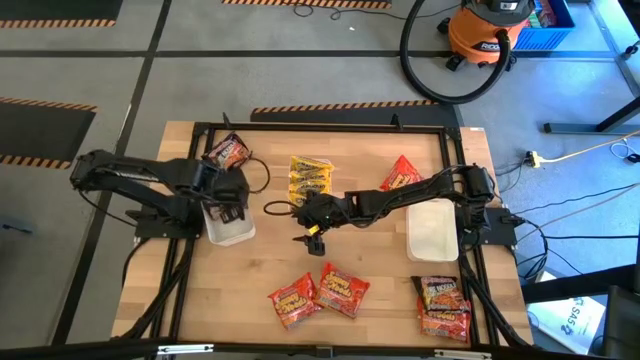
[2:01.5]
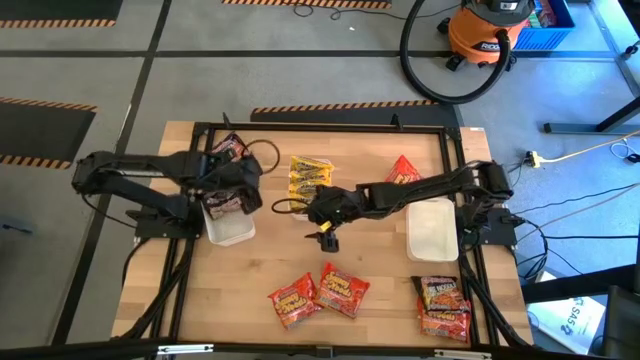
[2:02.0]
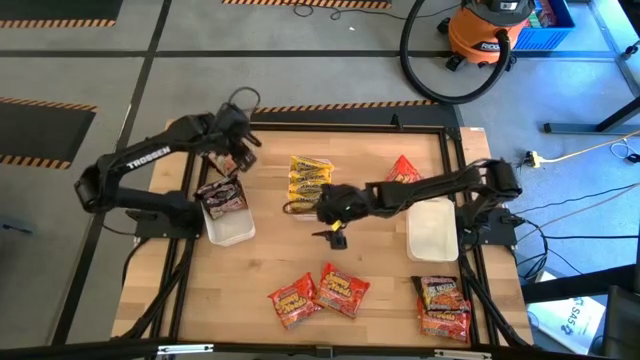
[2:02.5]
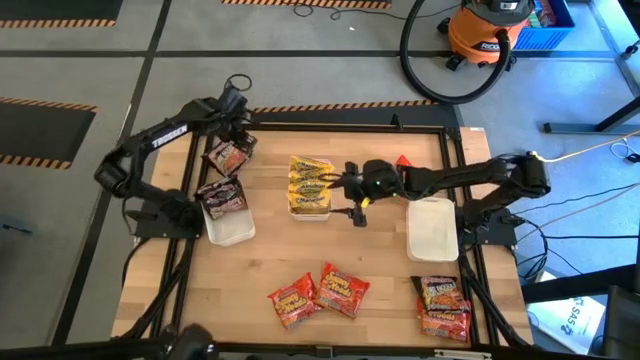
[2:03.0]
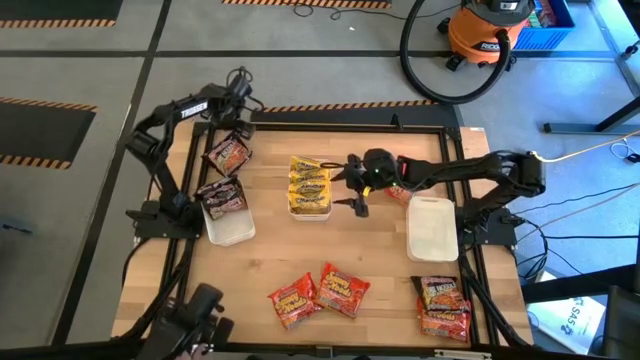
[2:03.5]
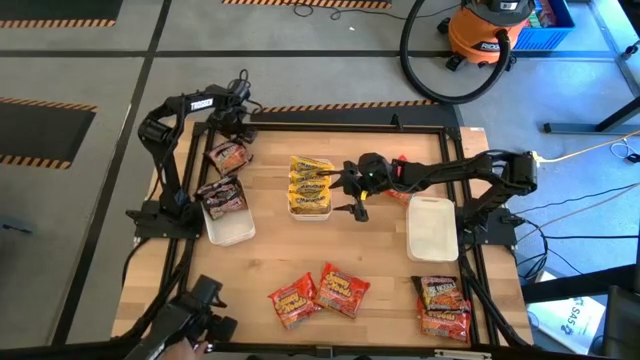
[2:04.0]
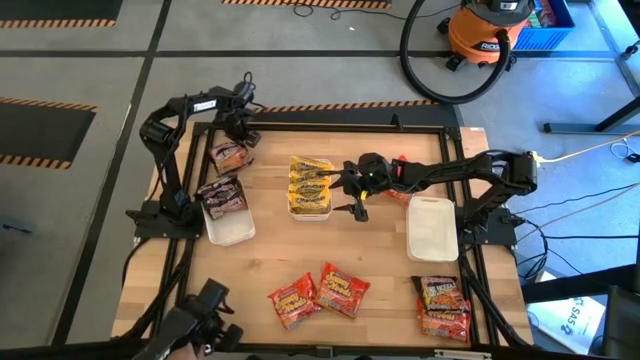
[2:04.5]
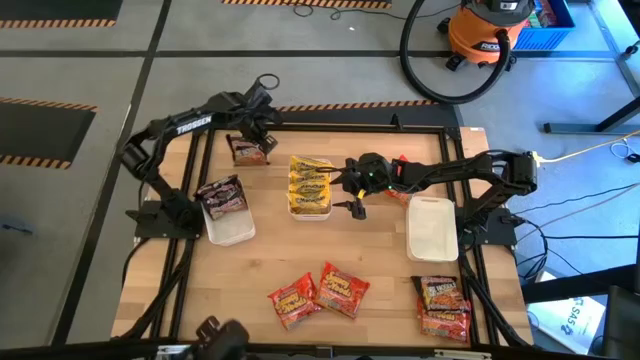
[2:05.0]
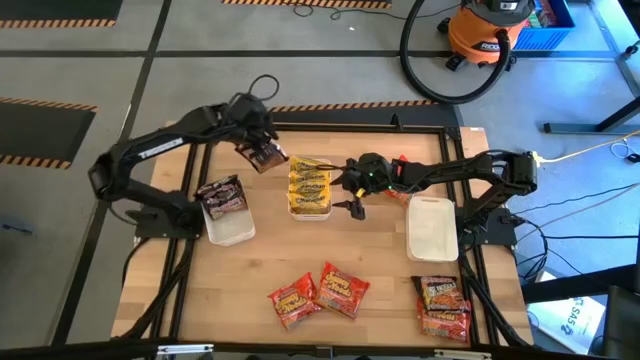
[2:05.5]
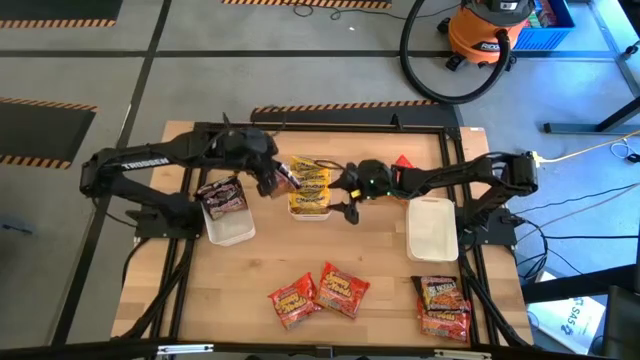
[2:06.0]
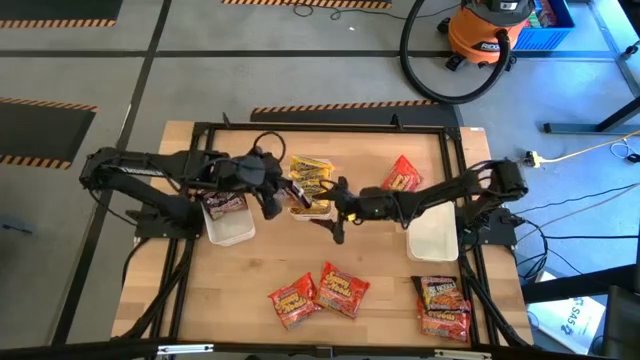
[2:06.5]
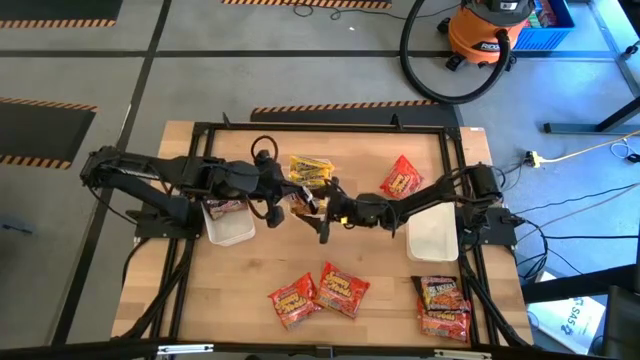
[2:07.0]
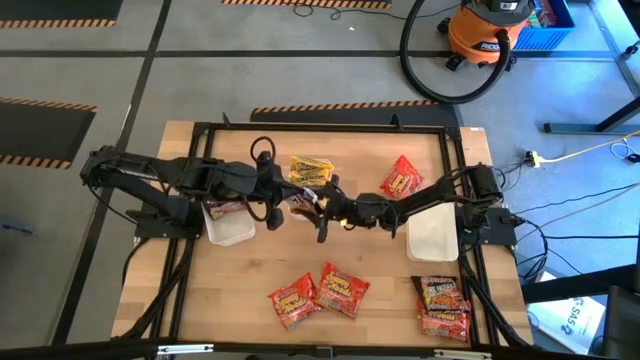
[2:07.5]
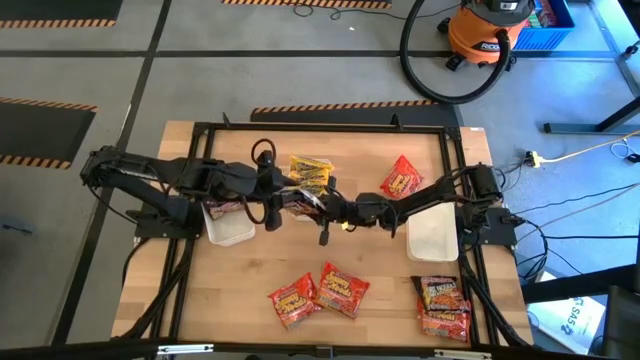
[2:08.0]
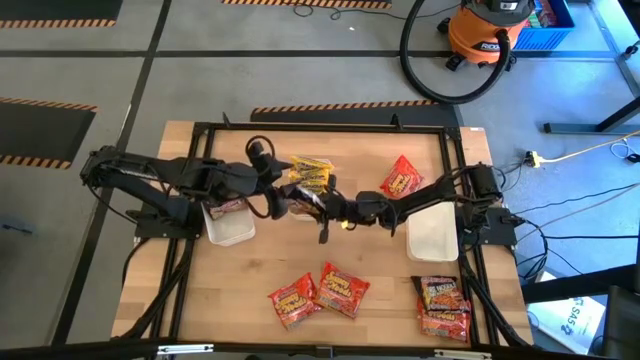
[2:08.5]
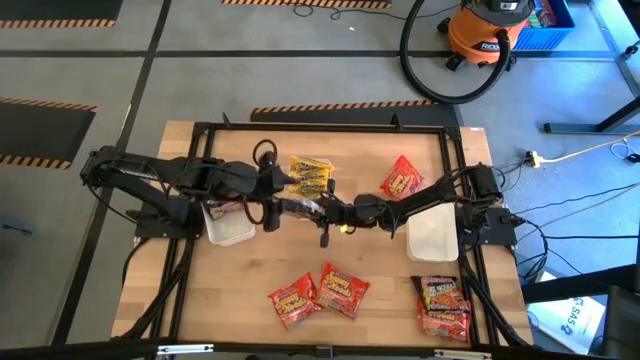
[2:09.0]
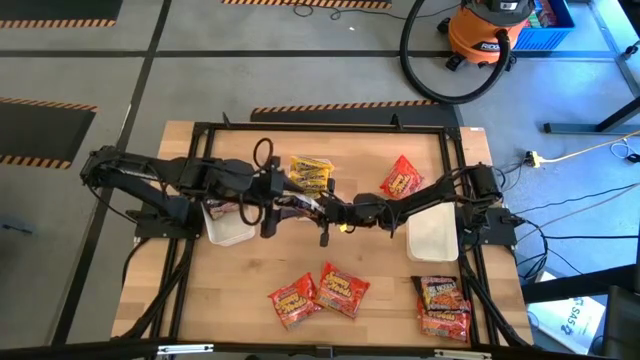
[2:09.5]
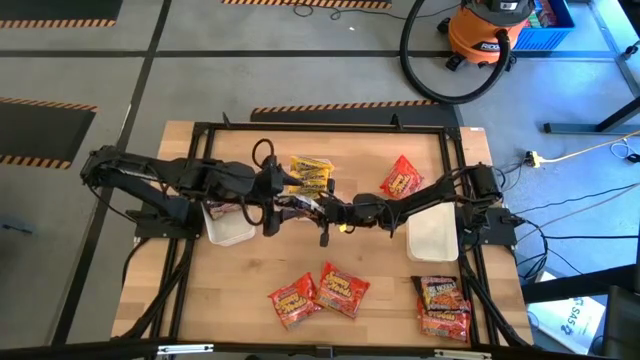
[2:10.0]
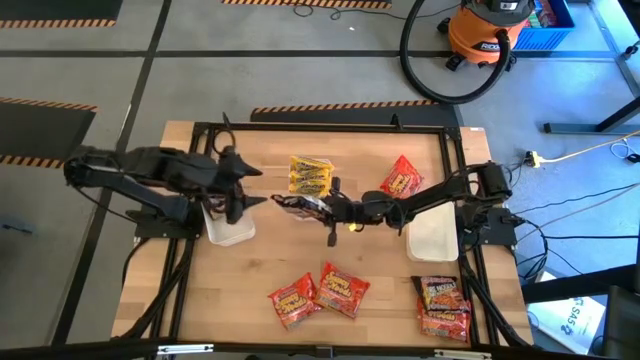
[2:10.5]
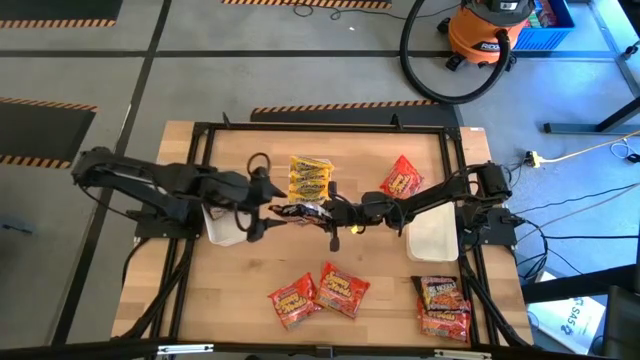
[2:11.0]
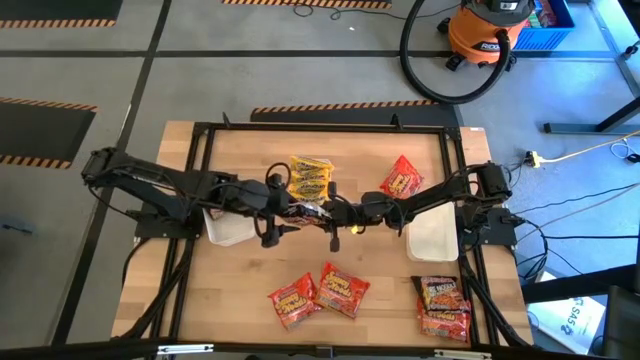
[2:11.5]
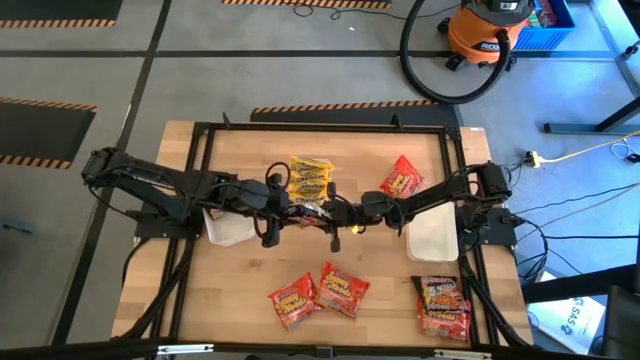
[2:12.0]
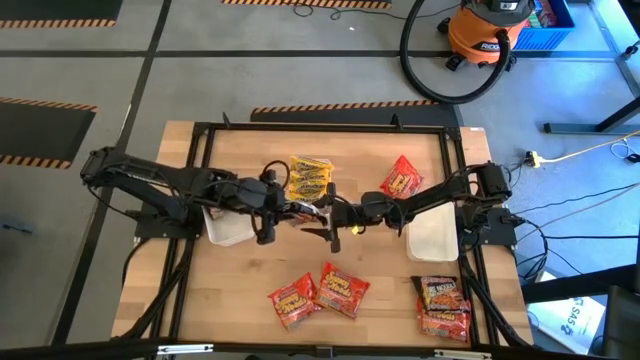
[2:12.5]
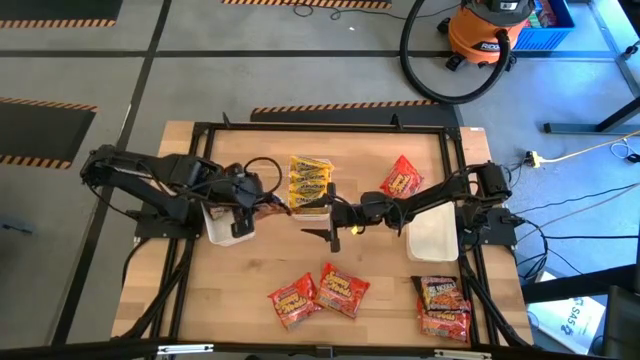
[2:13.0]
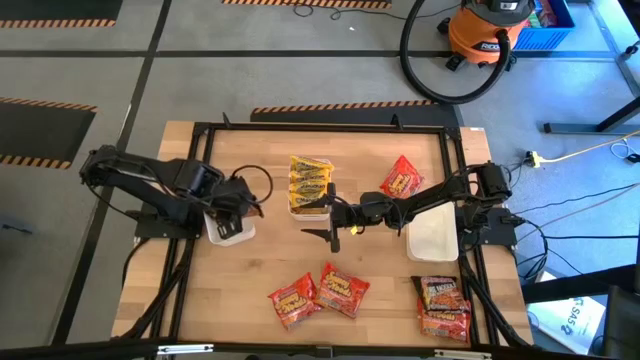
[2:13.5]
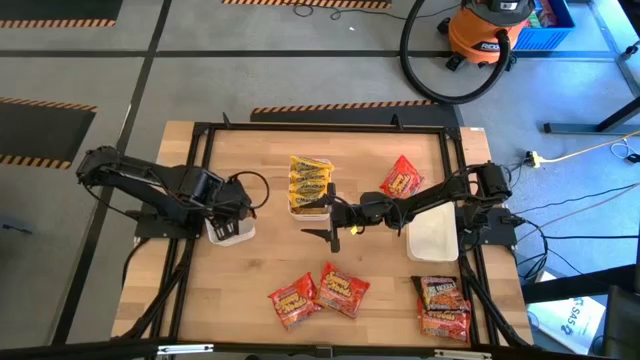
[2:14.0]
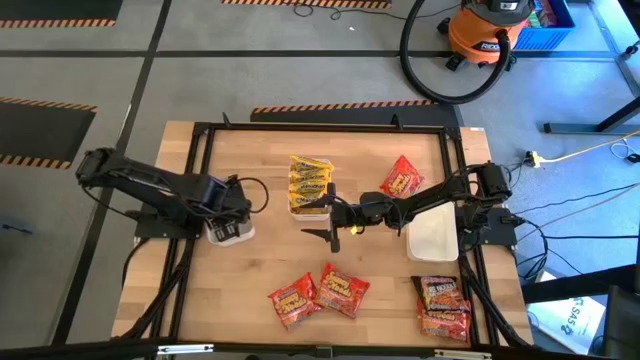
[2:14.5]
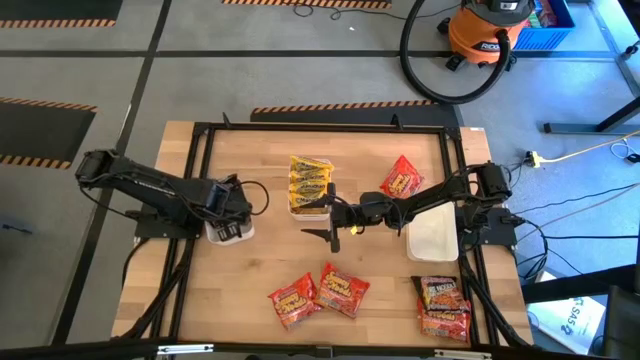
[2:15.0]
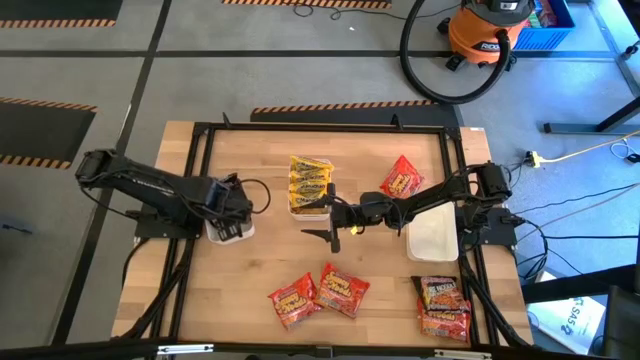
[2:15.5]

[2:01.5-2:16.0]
Task: Sort Maruchan noodles
Put the top black noodle pack into the left white bin

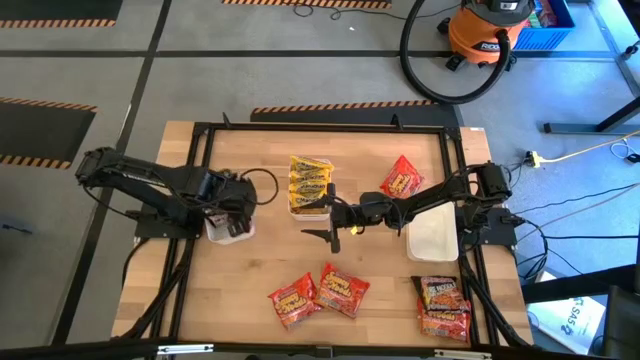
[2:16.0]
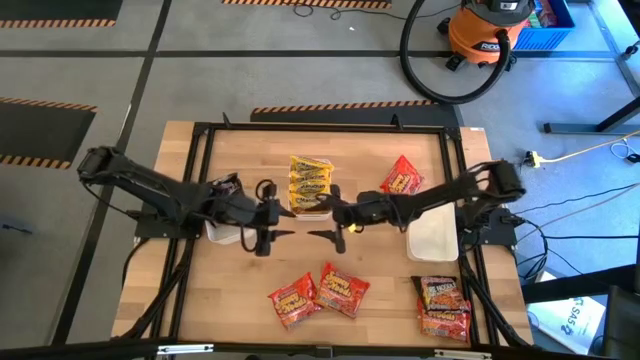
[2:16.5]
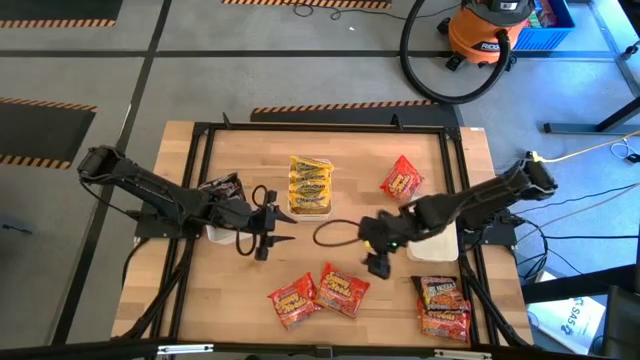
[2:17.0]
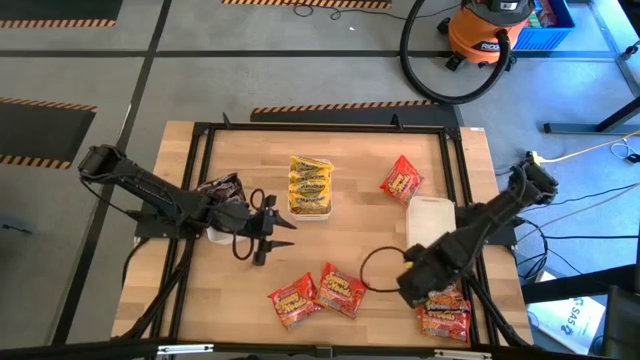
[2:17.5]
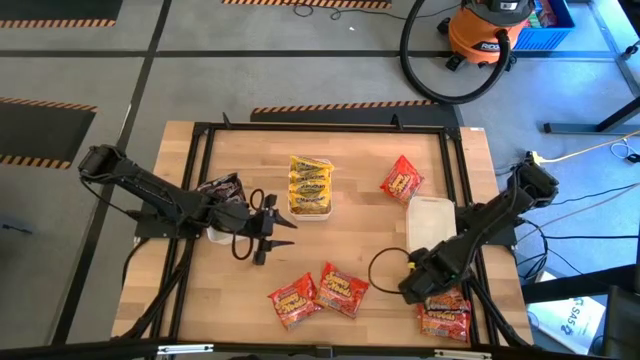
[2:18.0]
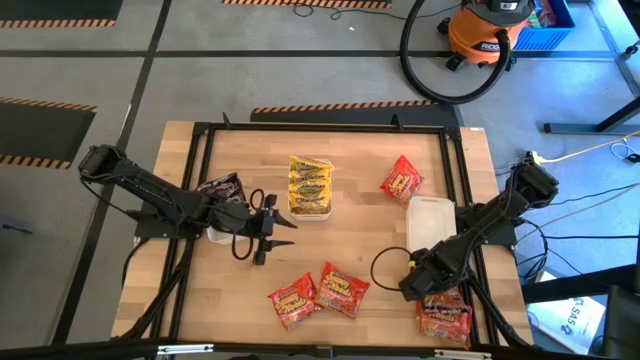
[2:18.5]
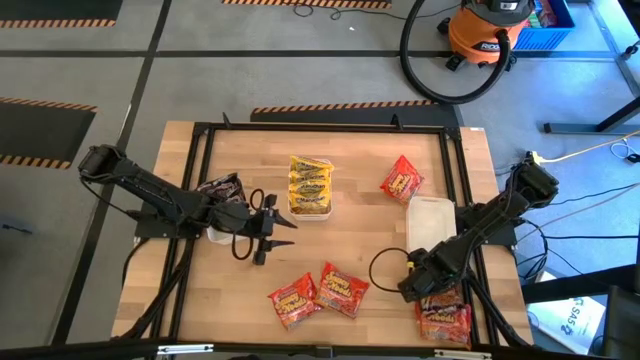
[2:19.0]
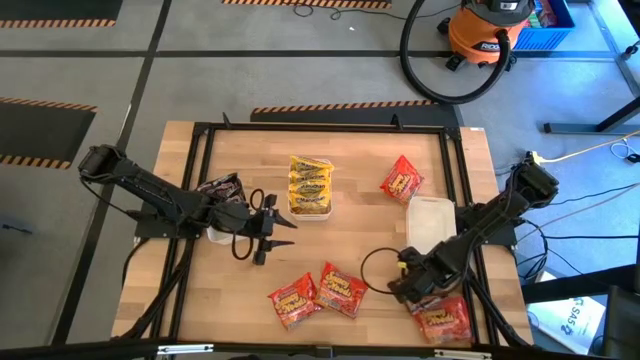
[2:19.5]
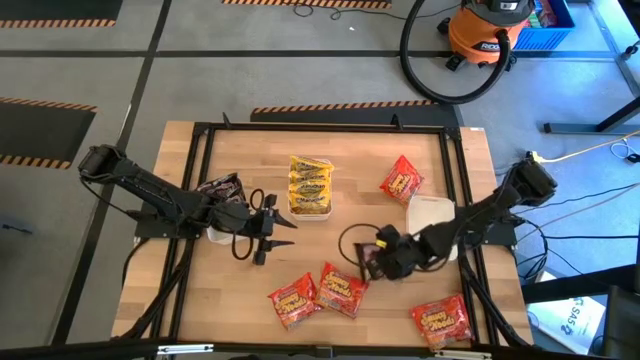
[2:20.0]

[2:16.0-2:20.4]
Put the black noodle pack into the left white bin

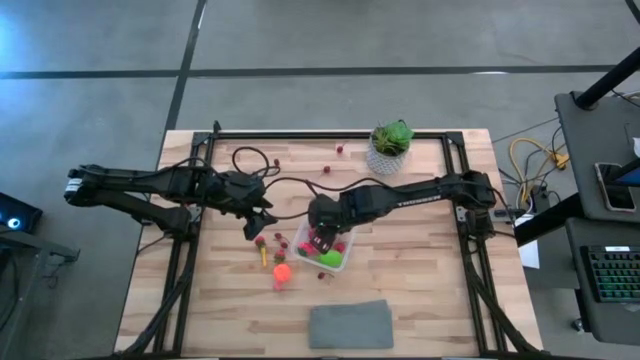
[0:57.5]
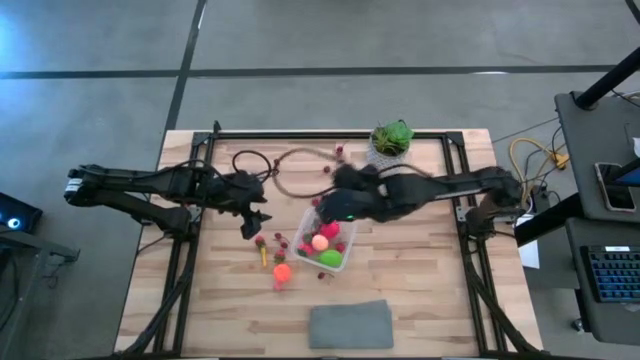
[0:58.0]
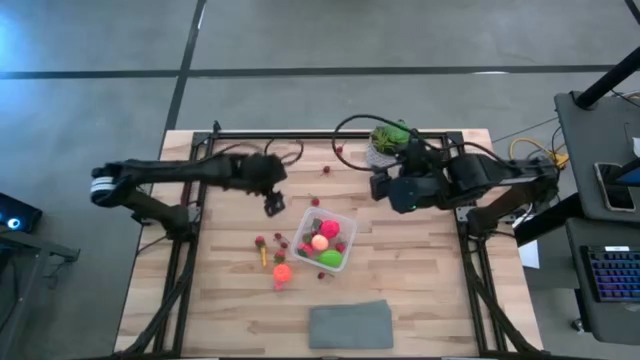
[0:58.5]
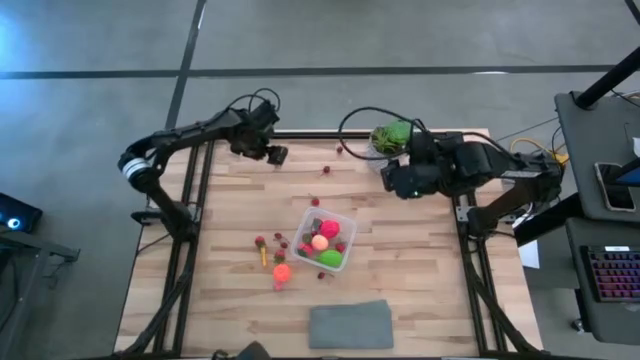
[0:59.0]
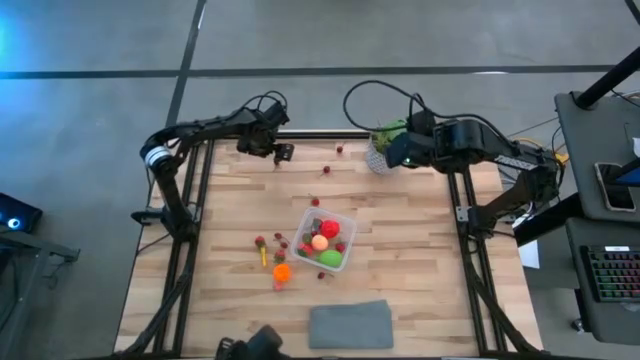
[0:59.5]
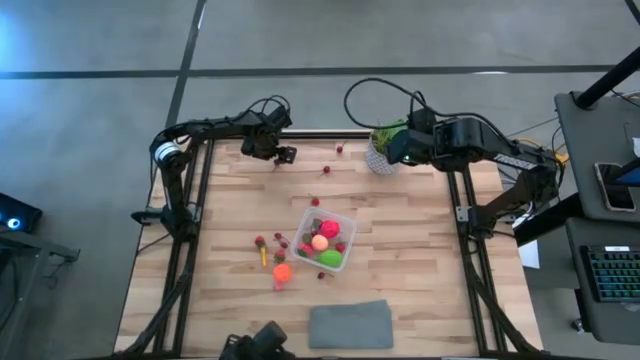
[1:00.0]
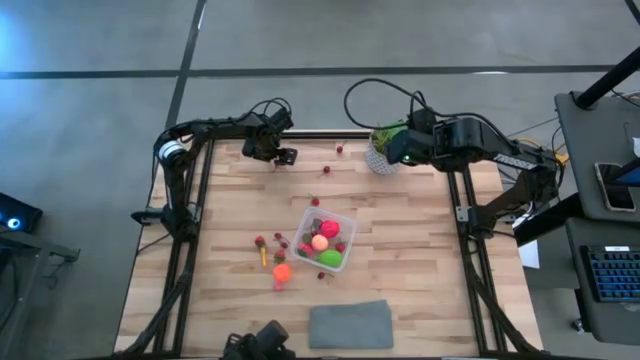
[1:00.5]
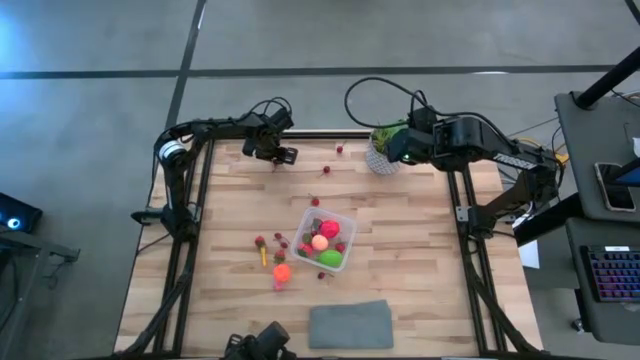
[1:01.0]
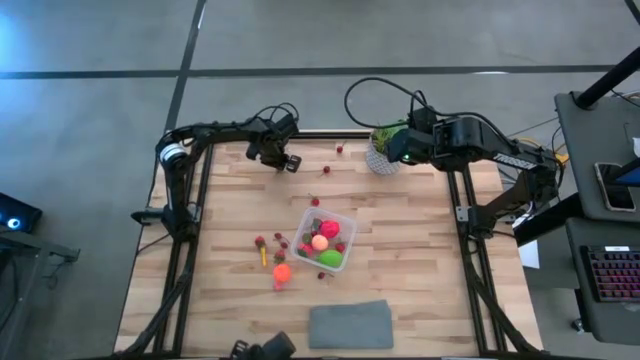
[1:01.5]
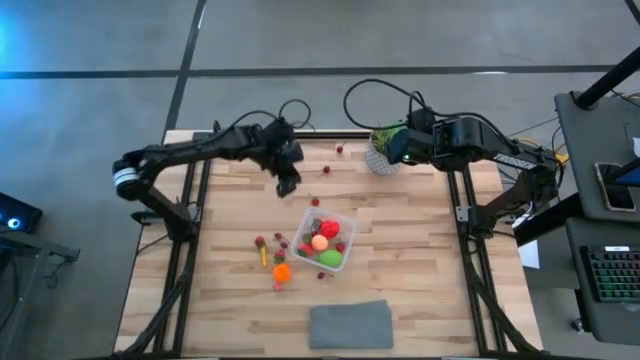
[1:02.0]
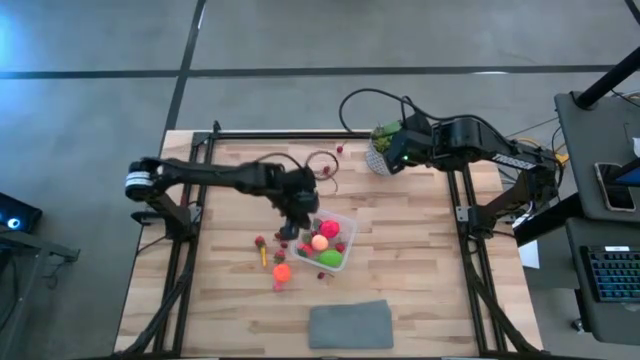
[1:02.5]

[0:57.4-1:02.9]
Task: Pick and placing Produce into tupperware
Put the red cherry into the transparent container
